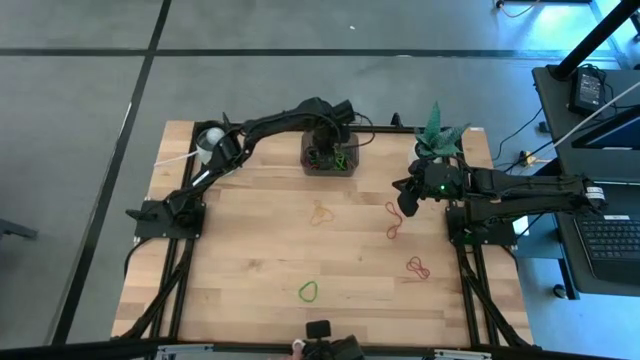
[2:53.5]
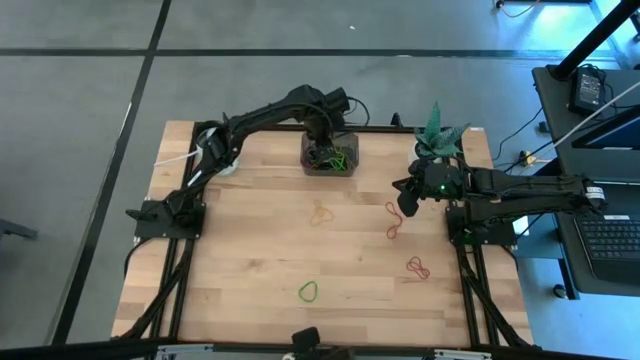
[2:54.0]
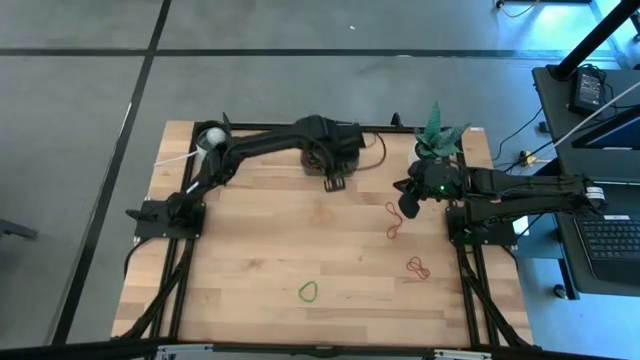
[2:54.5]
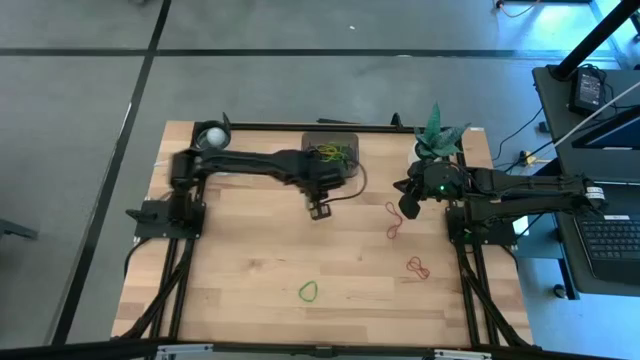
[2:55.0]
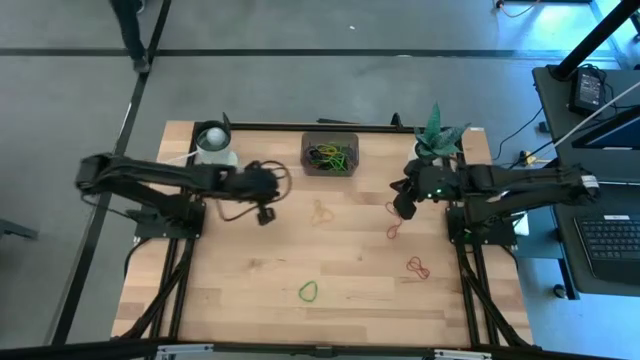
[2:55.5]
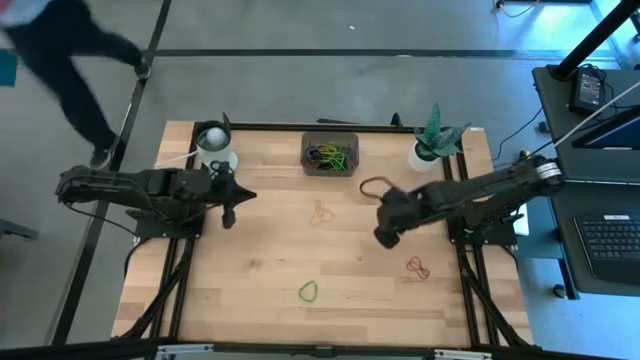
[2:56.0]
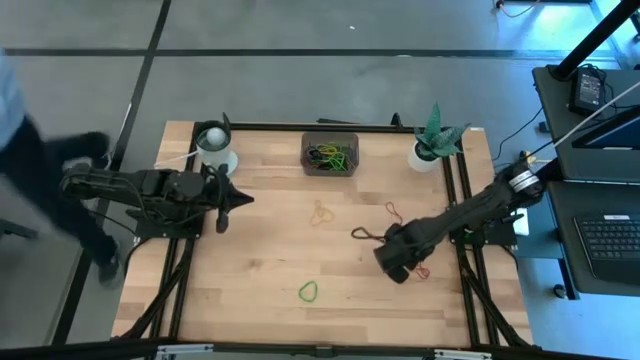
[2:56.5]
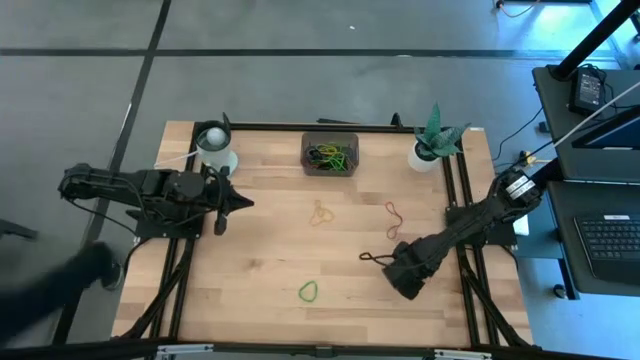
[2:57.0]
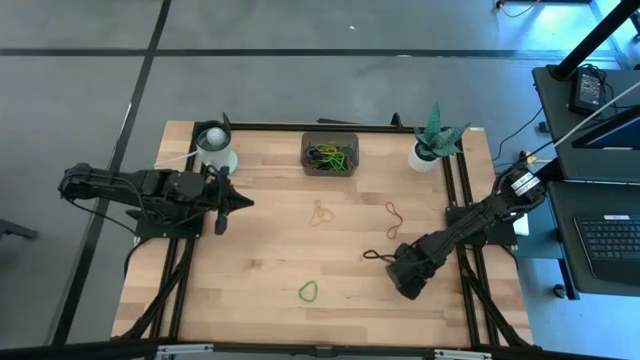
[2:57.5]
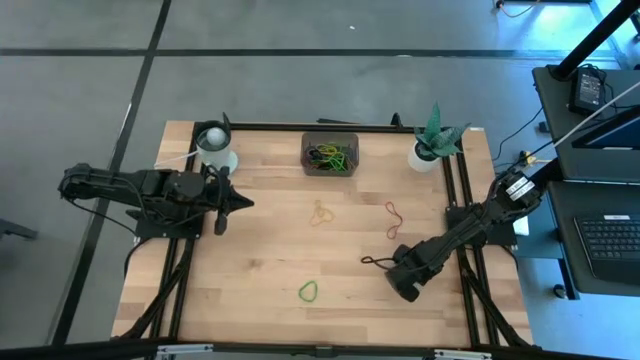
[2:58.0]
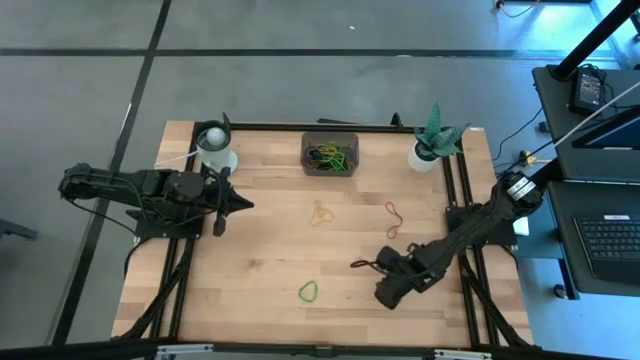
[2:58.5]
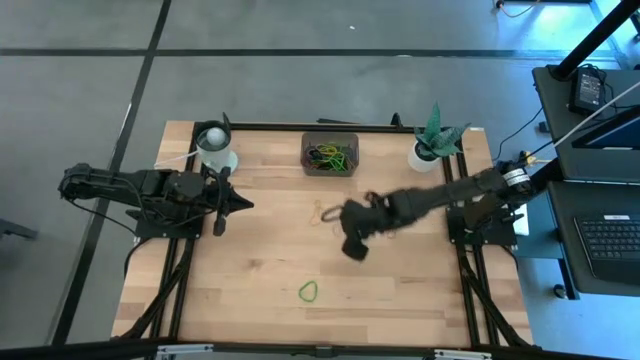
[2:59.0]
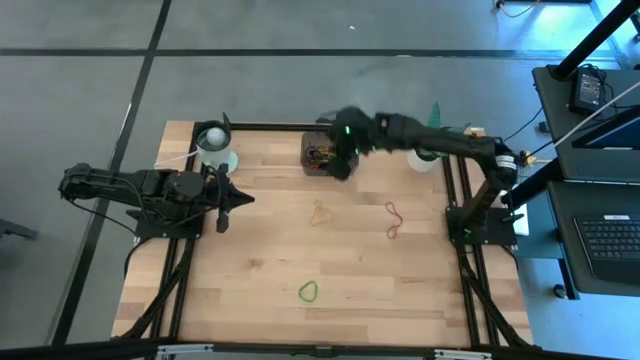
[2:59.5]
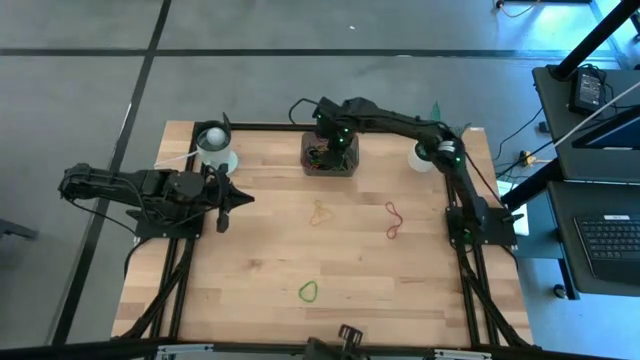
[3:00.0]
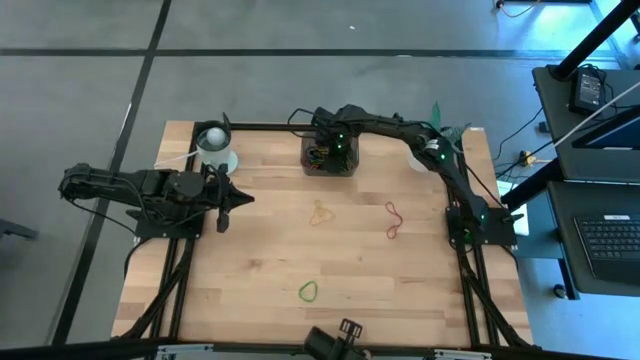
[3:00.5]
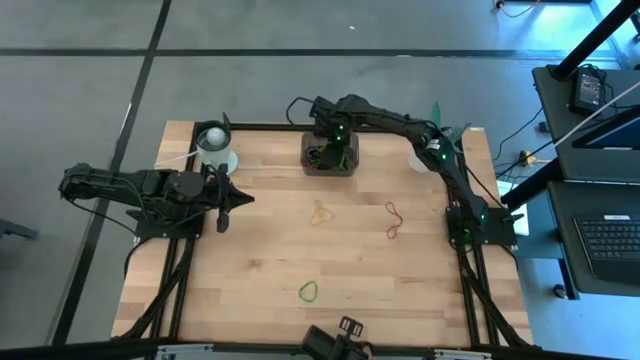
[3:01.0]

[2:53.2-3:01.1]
Task: Pick and place rubber bands into bin
Put the red rubber band into the bin

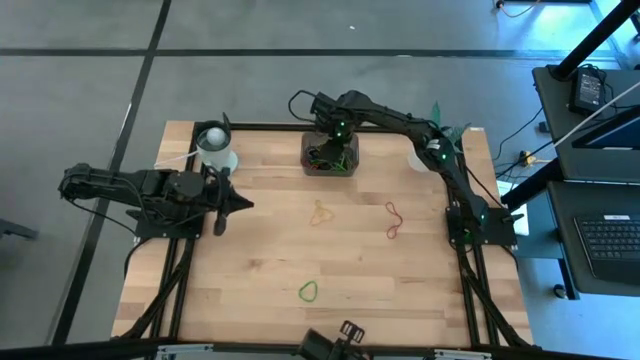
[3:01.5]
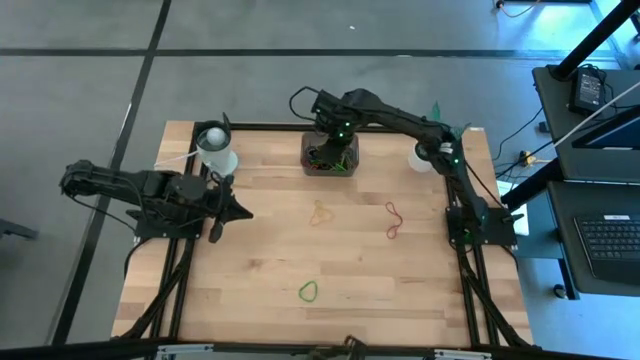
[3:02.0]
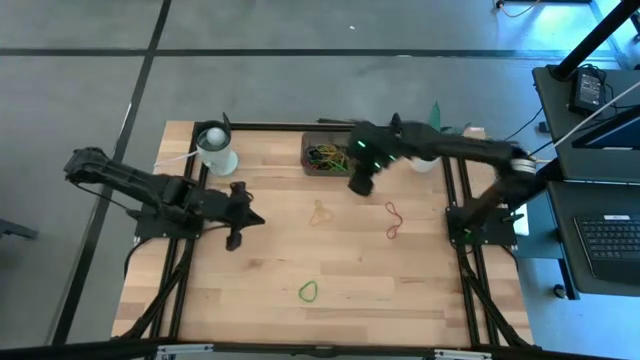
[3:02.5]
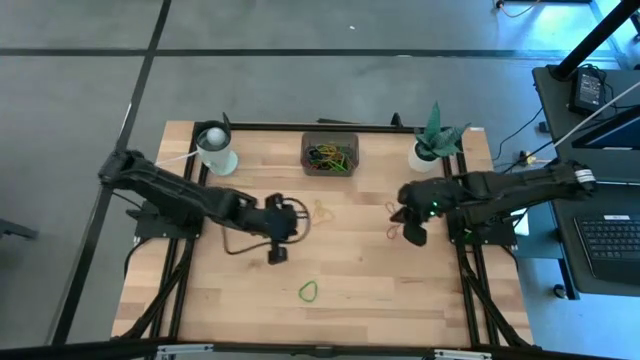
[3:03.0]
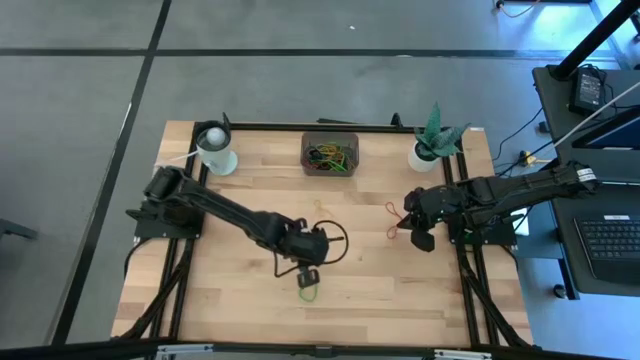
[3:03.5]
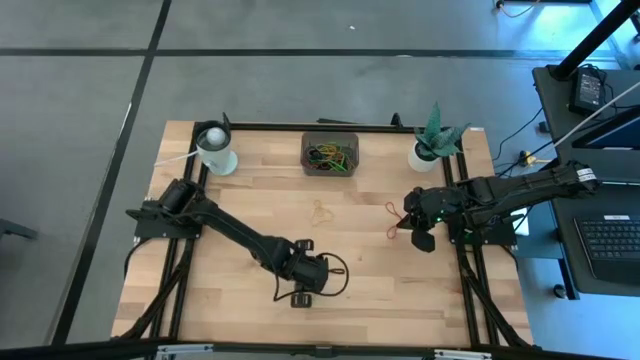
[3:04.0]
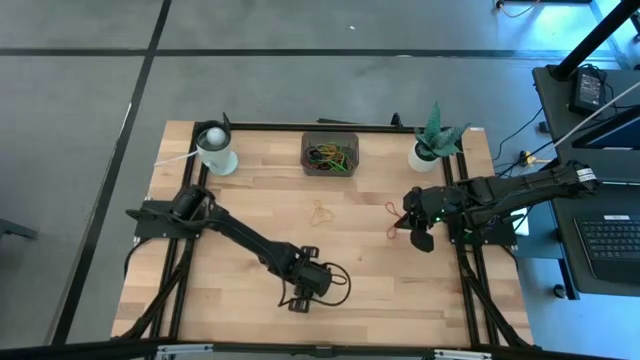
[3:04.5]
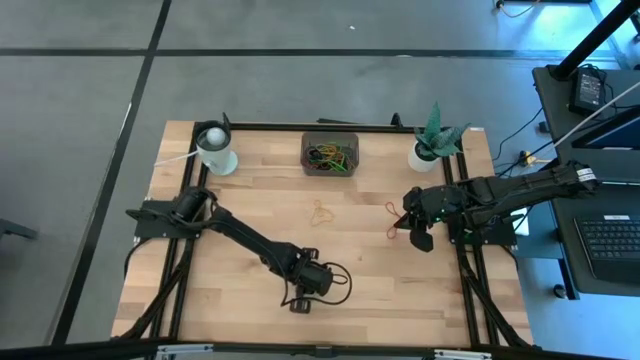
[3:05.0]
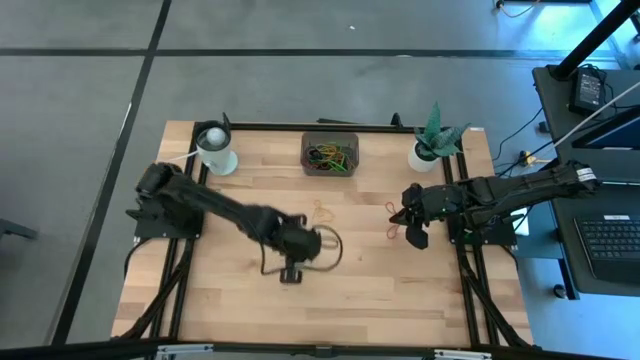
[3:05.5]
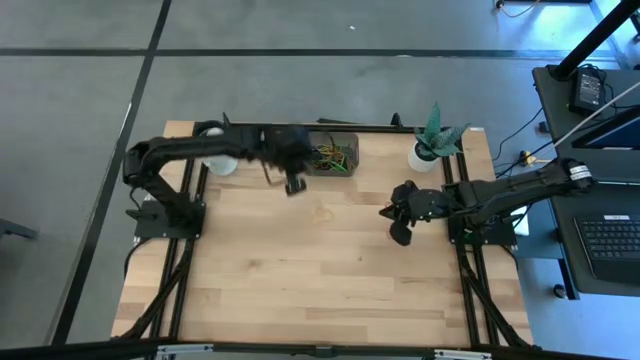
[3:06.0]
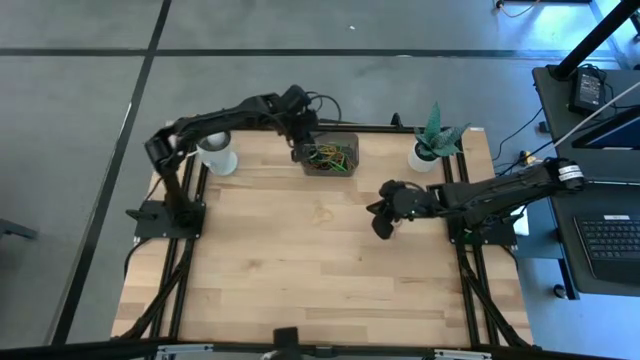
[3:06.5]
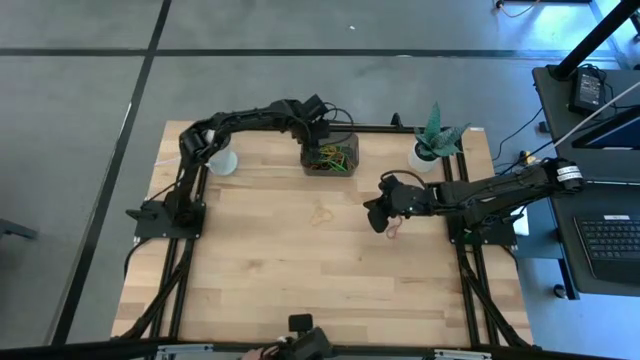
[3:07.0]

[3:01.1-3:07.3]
Put the green rubber band into the bin

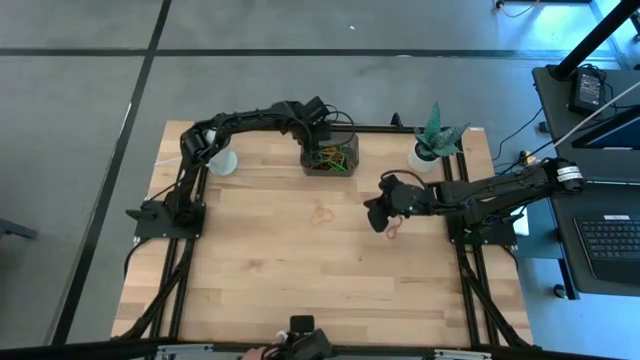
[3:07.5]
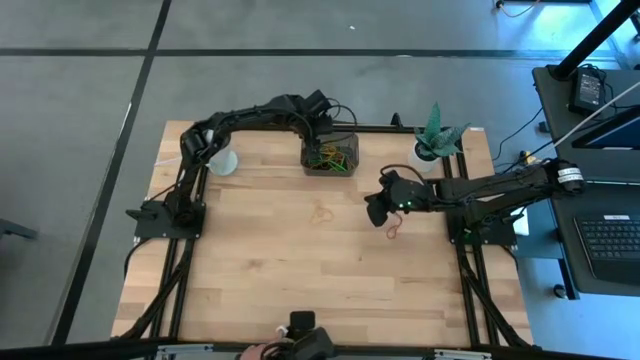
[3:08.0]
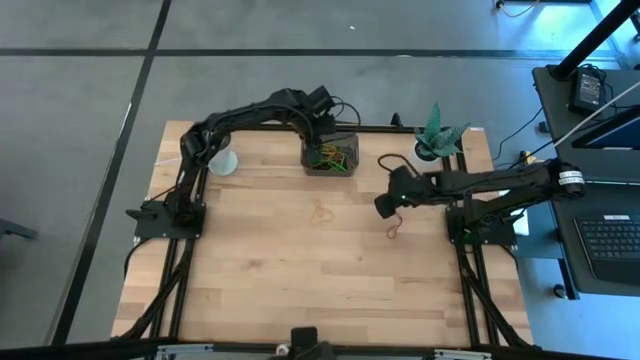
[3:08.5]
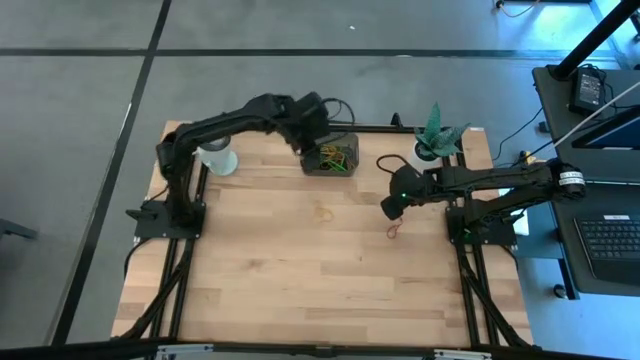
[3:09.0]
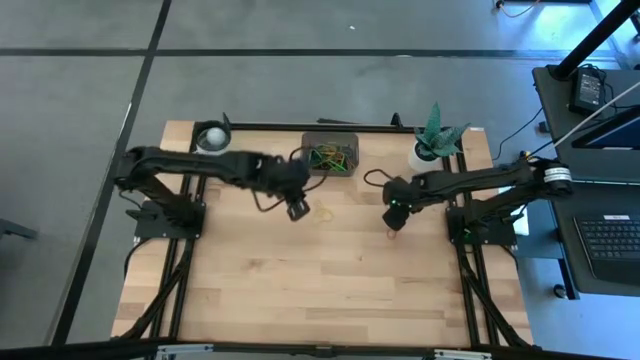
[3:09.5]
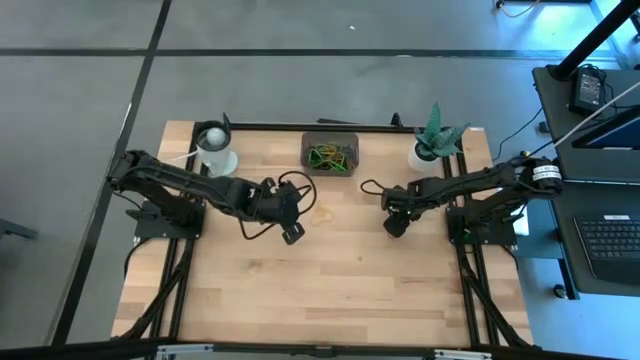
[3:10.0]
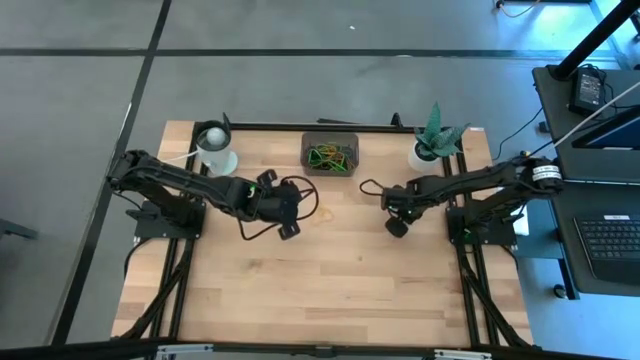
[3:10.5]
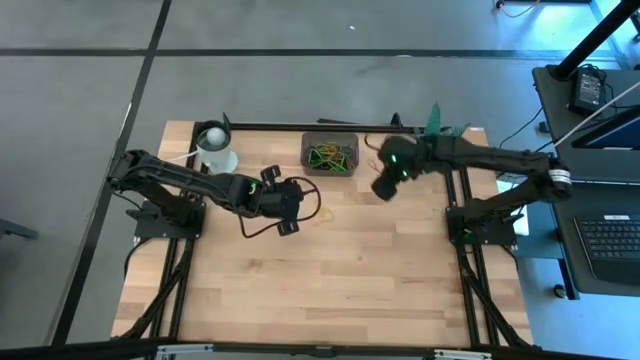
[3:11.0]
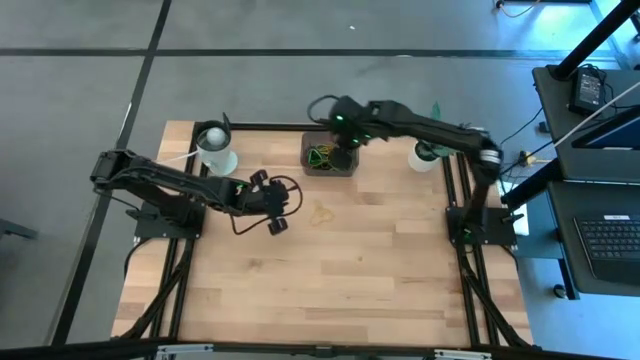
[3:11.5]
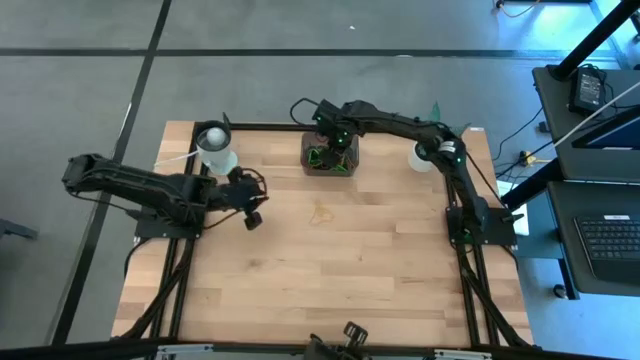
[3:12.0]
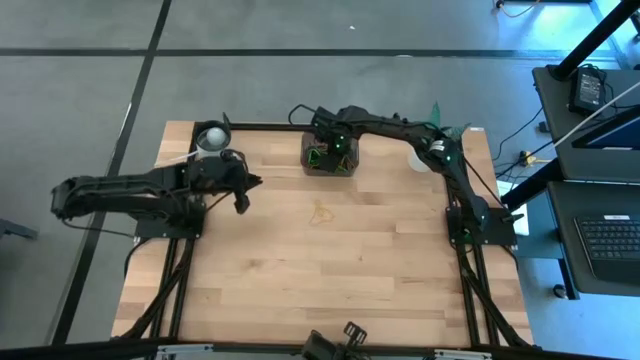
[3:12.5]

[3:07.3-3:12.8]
Put the red rubber band into the bin

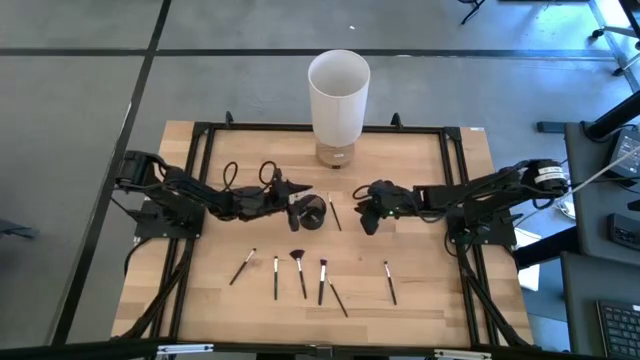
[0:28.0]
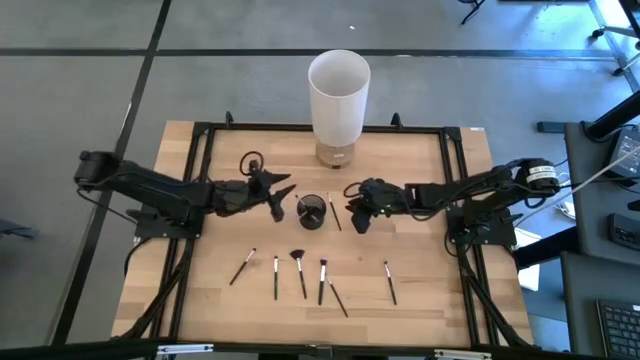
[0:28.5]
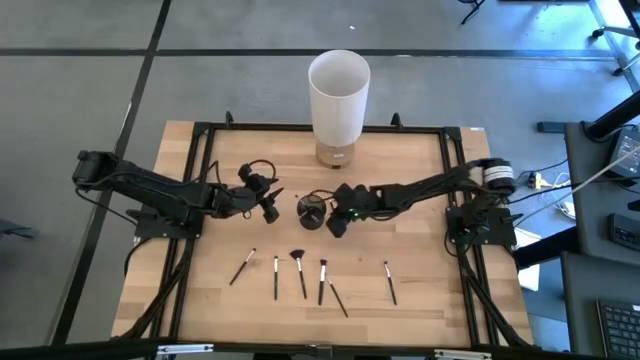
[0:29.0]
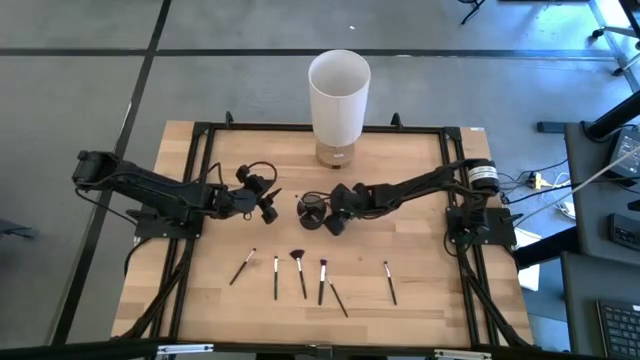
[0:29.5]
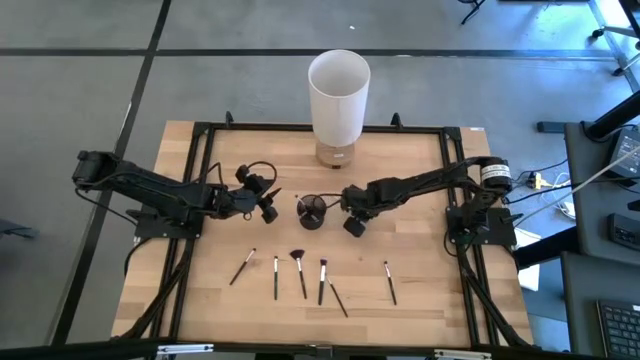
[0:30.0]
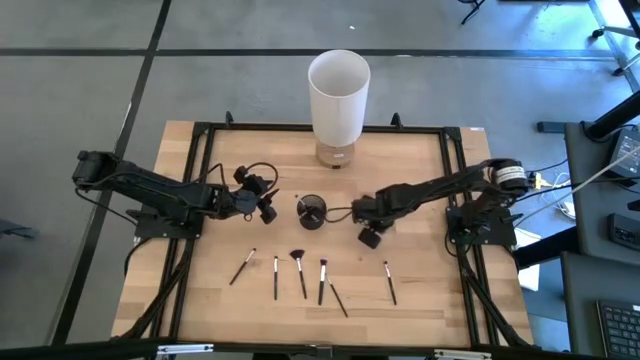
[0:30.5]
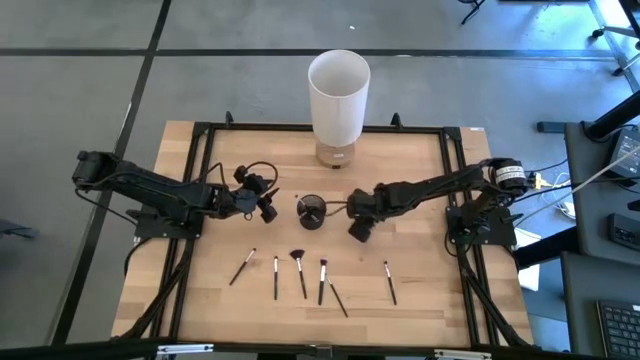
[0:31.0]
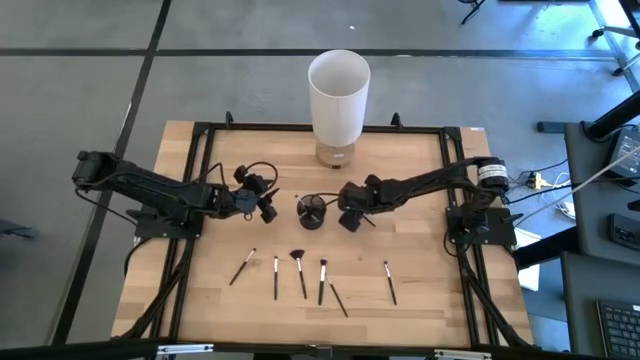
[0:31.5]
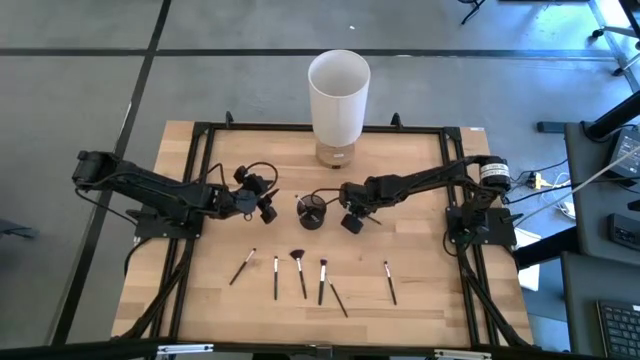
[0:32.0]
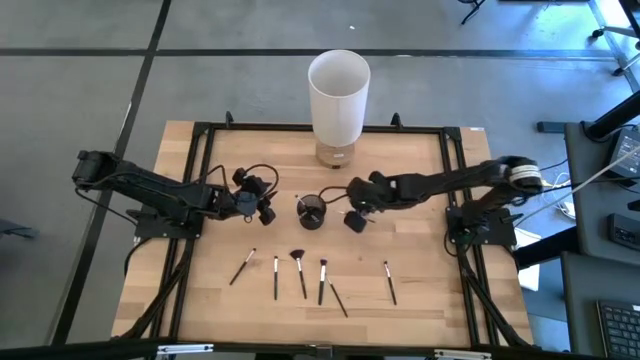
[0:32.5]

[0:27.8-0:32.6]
Task: Put items in baskets/containers
Put the black eyeshadow brush into the black pen holder
